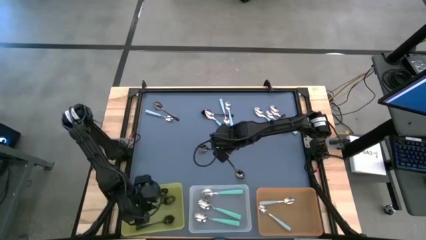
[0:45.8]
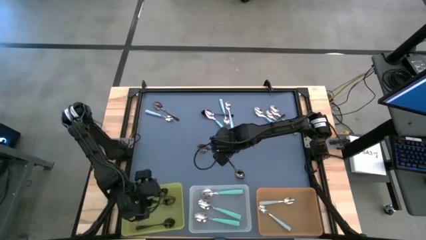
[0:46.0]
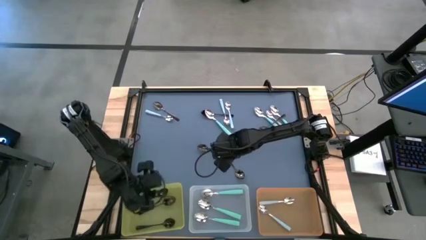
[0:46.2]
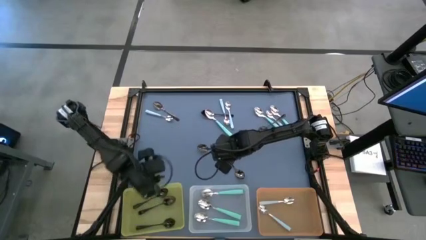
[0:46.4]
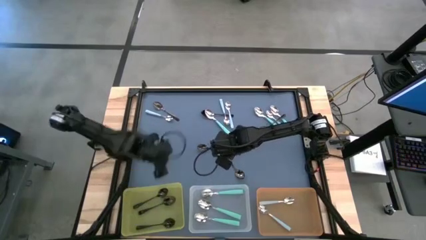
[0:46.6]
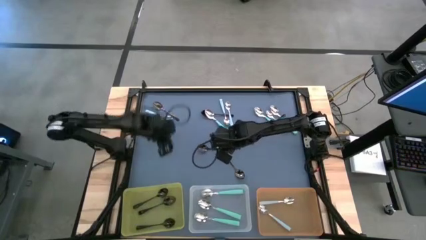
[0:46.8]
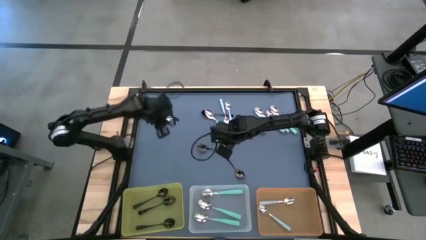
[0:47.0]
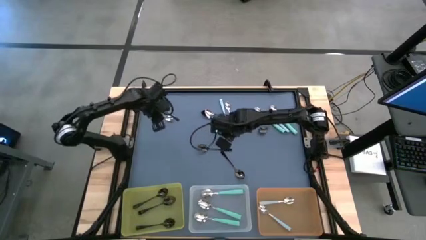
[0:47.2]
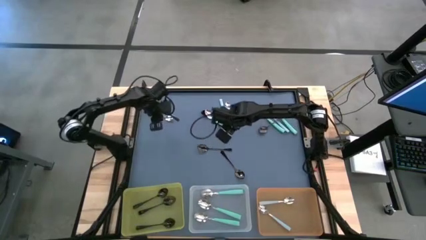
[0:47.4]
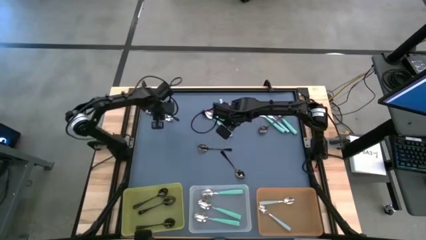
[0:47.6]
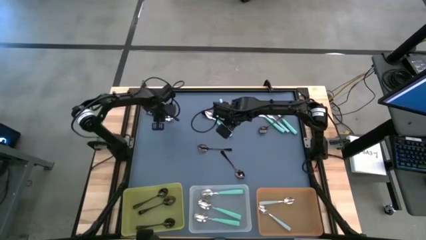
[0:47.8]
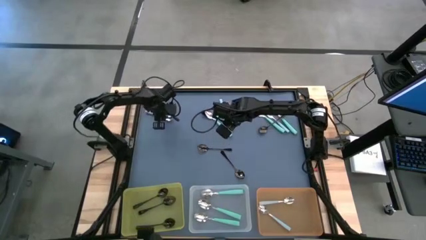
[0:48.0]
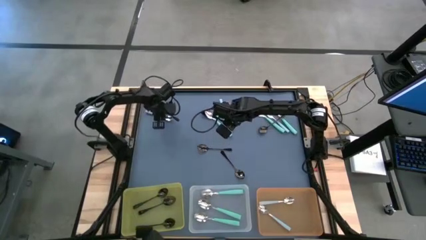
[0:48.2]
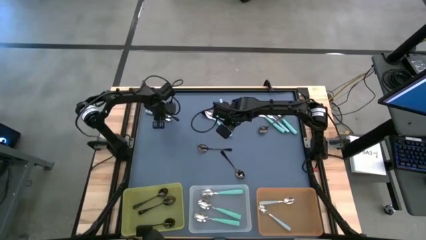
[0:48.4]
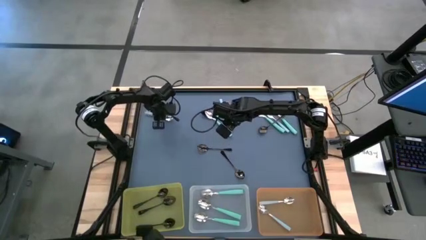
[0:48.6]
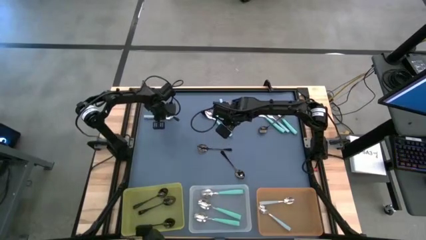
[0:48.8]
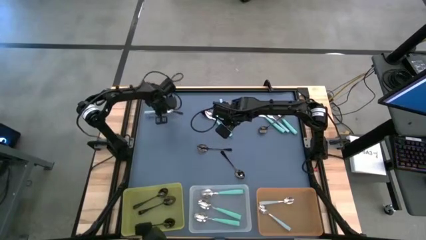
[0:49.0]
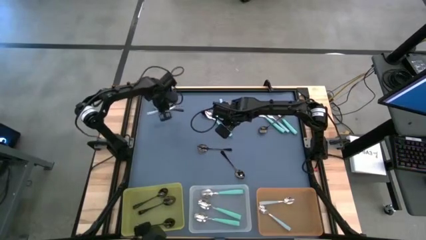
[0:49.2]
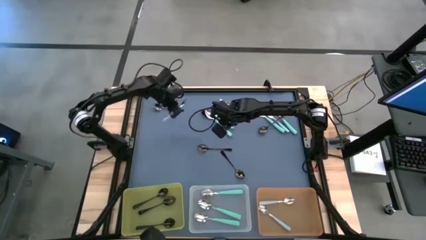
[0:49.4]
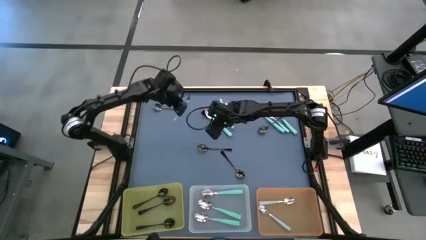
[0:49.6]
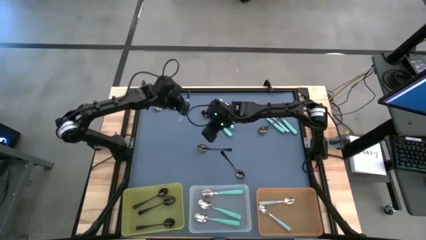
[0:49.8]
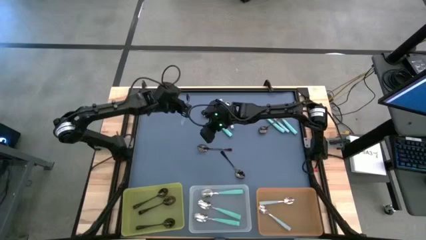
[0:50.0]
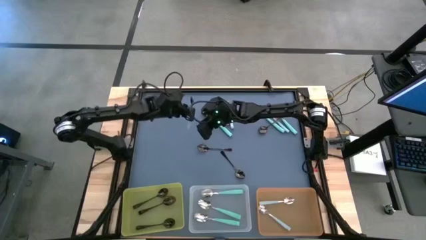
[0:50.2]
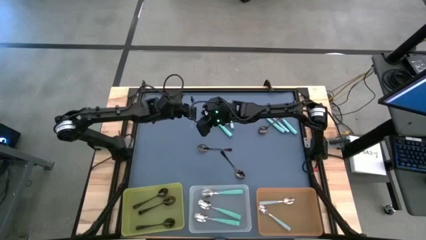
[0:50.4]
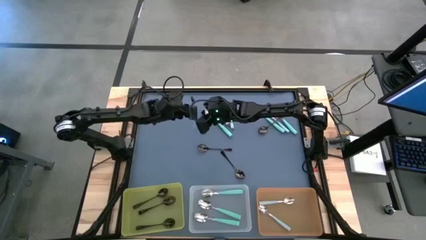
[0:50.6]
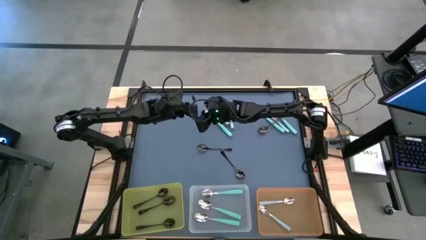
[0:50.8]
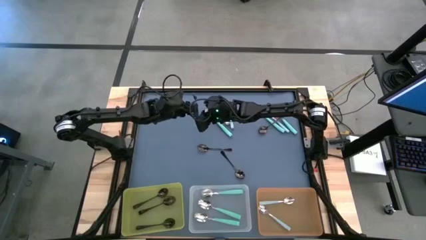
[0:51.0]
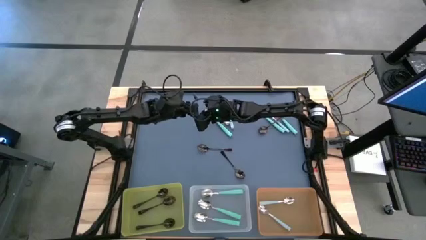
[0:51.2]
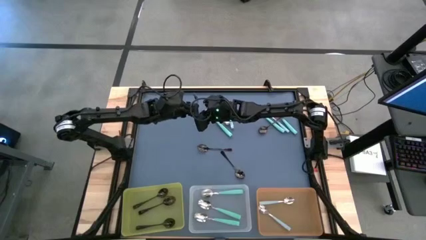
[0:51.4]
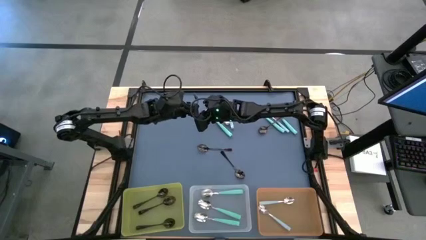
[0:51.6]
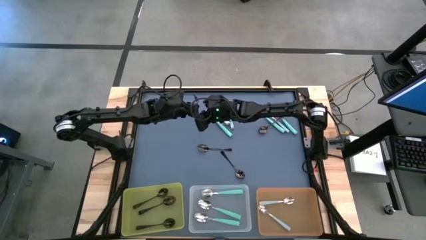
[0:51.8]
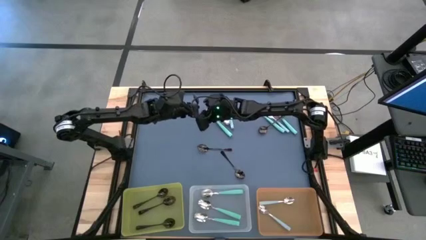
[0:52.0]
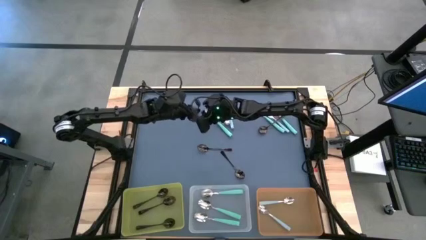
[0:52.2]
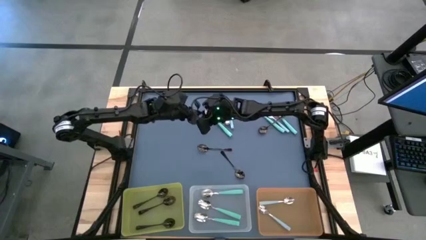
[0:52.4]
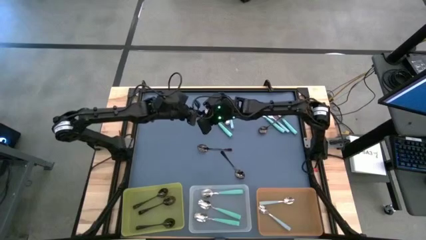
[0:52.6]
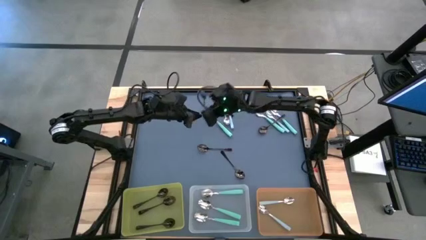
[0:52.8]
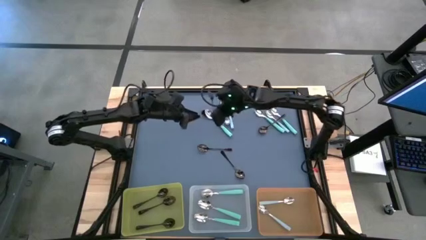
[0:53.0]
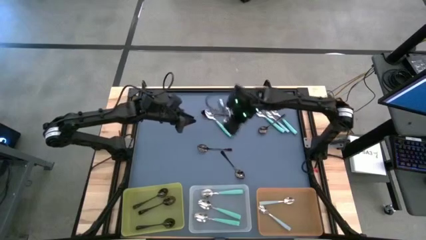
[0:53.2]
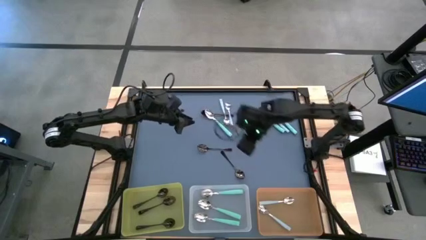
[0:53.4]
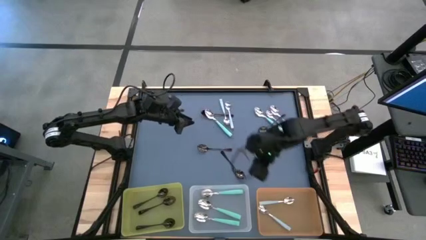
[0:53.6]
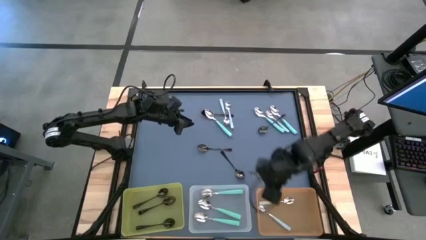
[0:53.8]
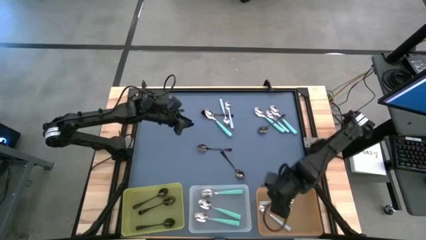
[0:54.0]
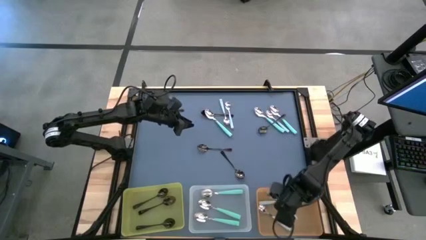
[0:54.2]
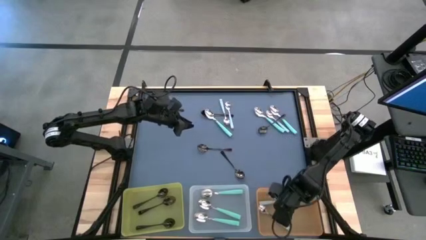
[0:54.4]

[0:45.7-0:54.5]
Task: Sort silverware by color (type)
Put the blue spoon into the orange bin

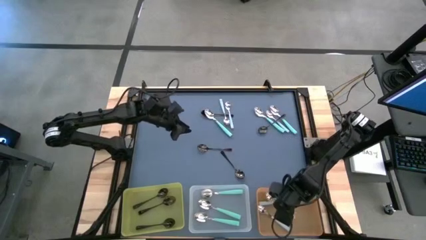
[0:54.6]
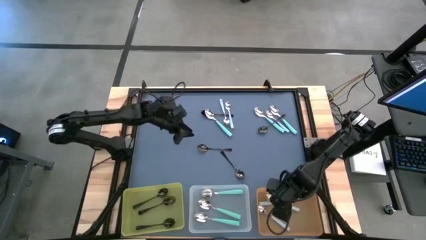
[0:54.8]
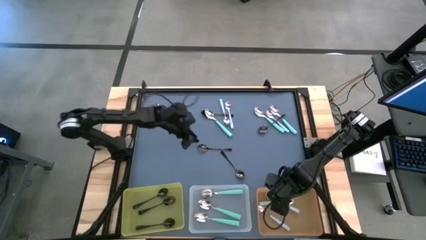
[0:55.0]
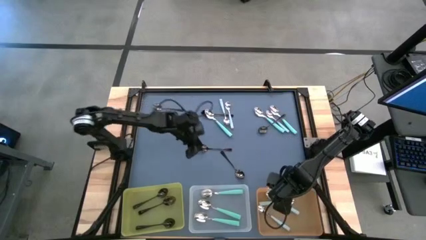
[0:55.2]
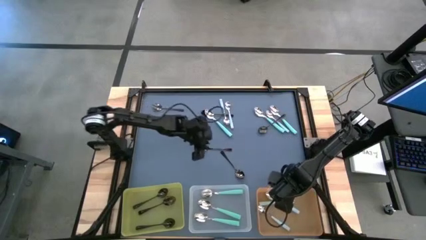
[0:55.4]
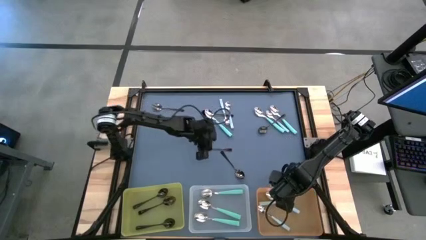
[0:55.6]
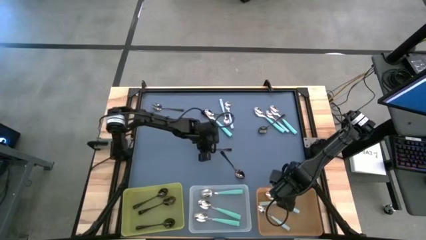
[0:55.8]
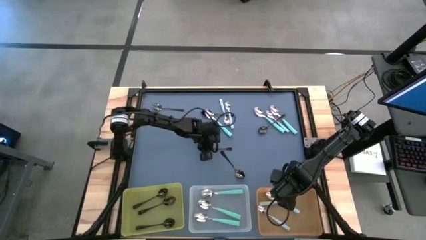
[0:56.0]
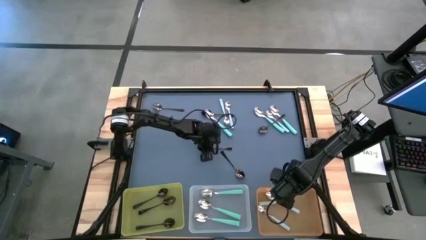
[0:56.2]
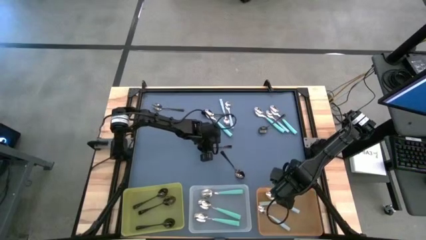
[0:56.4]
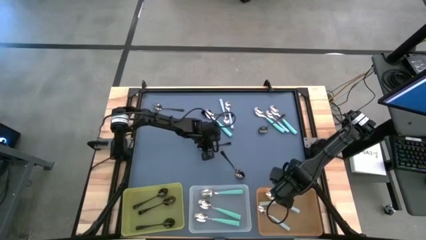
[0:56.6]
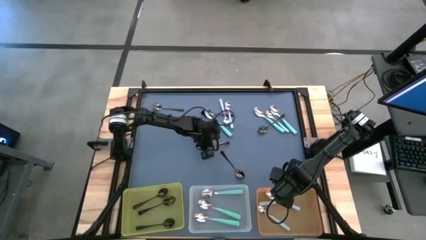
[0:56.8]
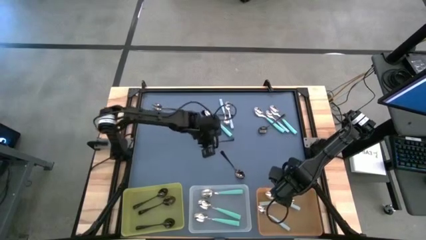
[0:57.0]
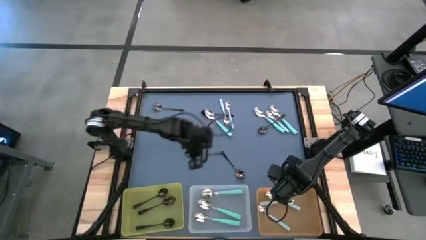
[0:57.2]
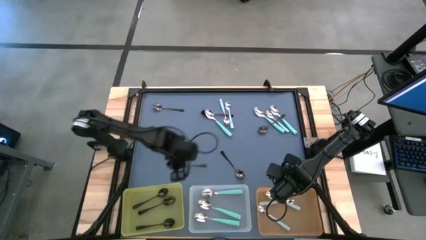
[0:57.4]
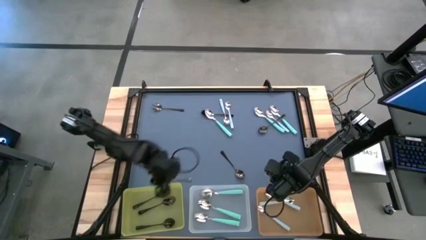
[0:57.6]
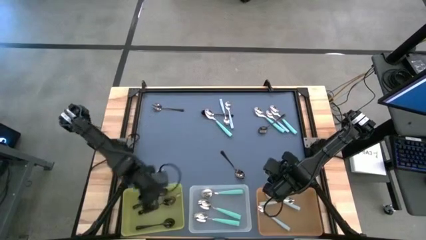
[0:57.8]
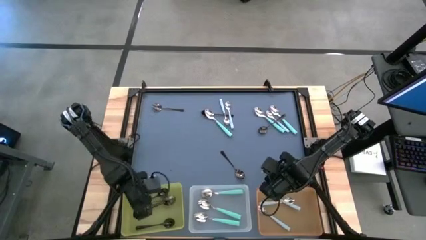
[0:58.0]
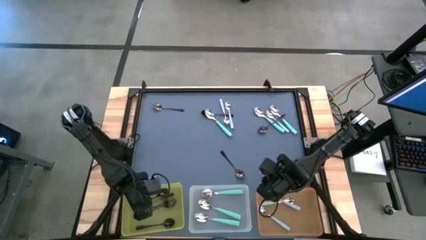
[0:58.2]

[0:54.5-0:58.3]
Put the black spoon into the yellow bin

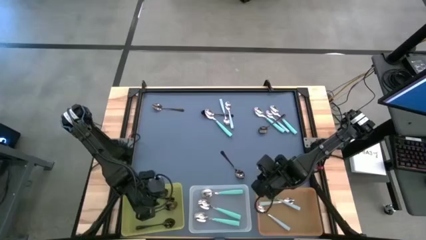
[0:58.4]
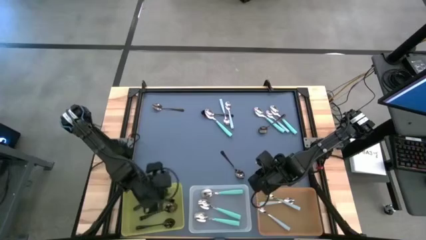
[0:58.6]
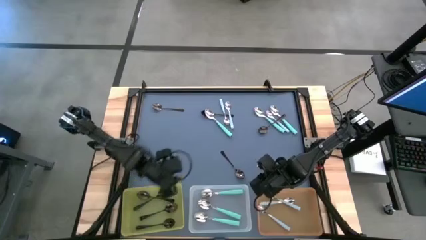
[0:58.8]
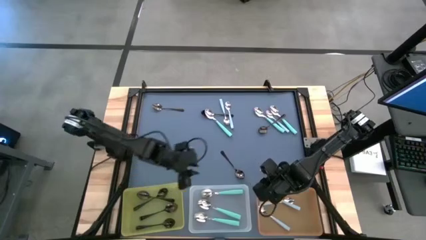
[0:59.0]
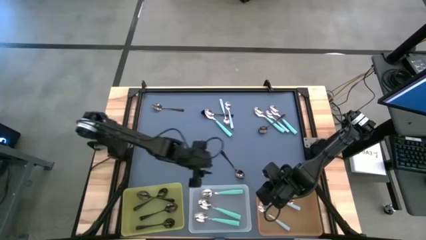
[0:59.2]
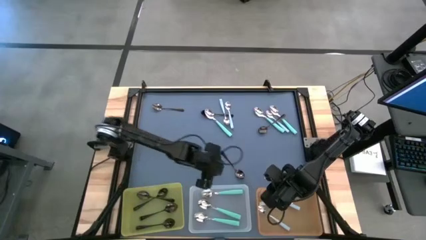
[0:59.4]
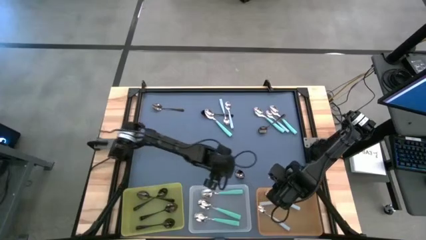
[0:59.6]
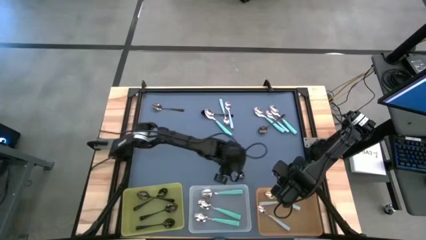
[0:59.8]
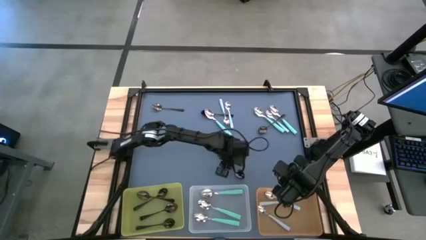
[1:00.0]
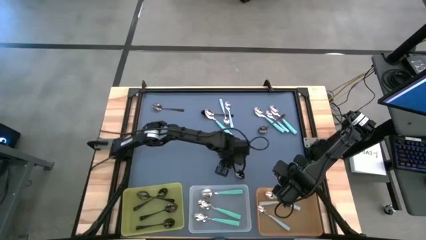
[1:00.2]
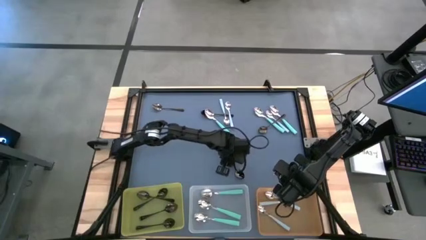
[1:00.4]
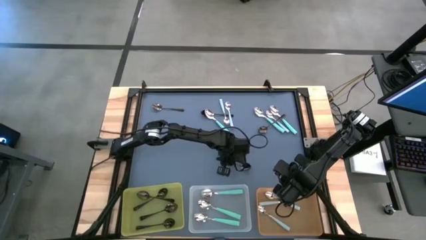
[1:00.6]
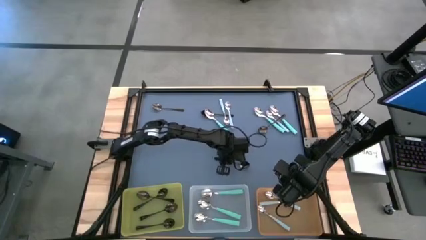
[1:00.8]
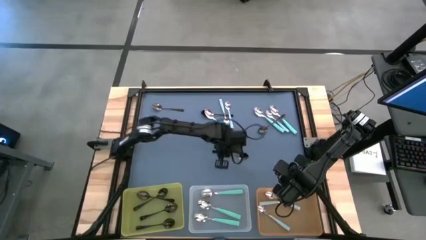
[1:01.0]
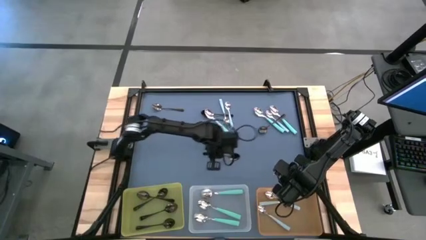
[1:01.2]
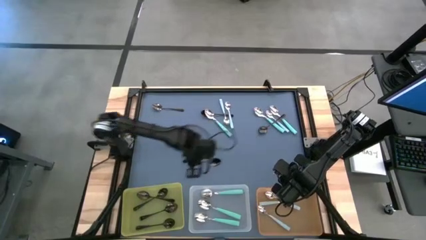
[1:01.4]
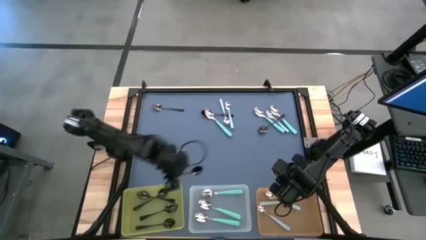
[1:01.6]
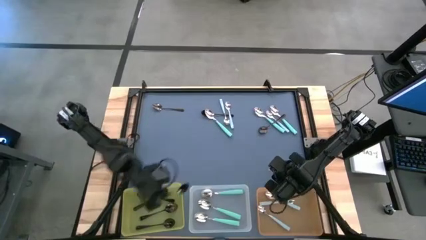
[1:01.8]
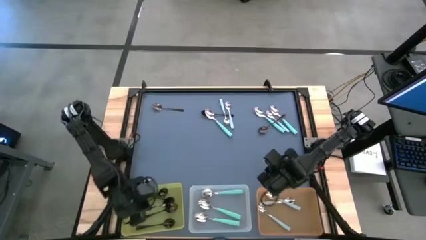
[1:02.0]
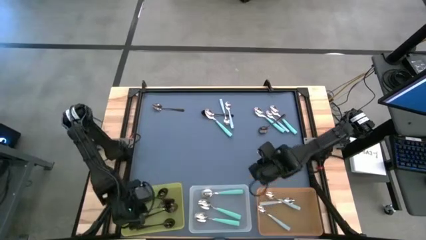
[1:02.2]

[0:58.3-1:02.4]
Put the black spoon into the yellow bin
